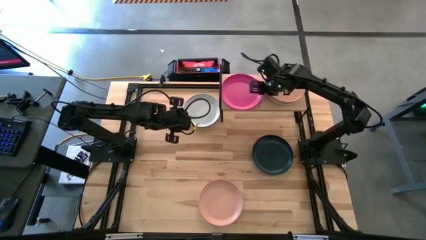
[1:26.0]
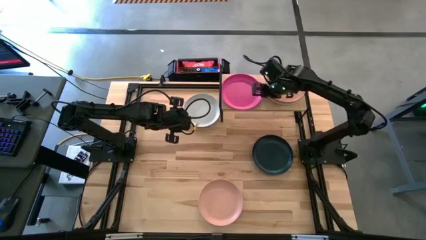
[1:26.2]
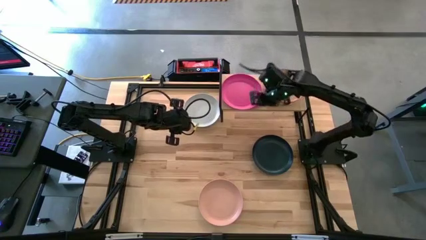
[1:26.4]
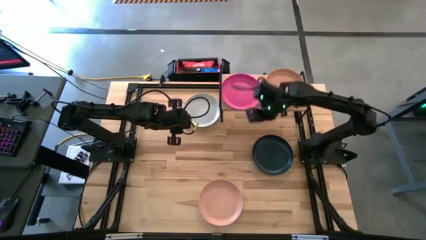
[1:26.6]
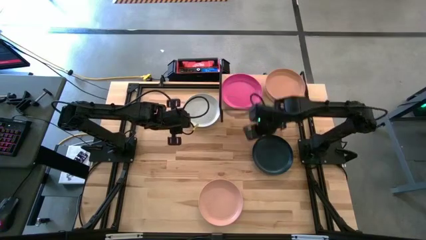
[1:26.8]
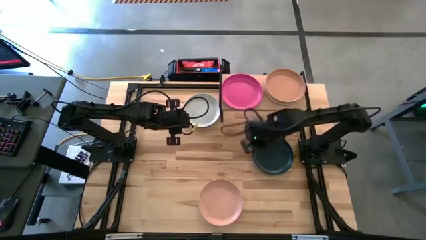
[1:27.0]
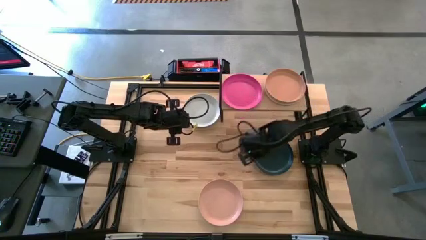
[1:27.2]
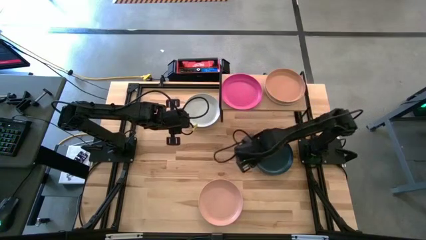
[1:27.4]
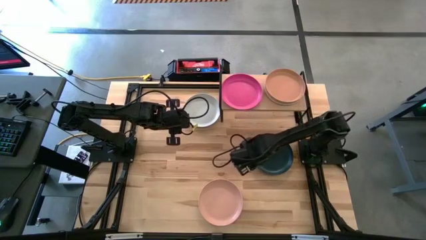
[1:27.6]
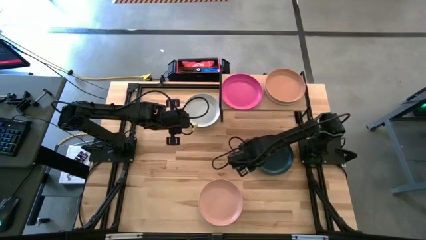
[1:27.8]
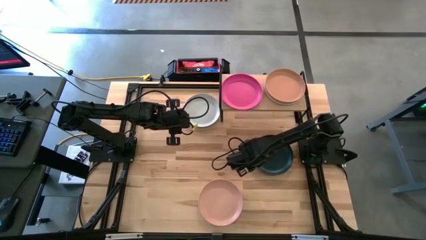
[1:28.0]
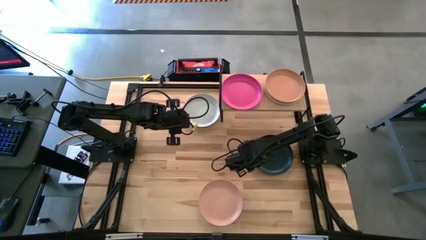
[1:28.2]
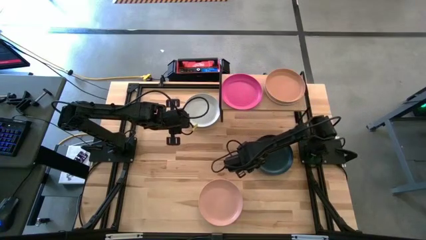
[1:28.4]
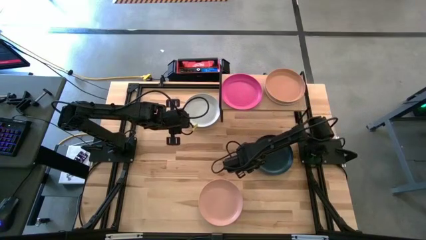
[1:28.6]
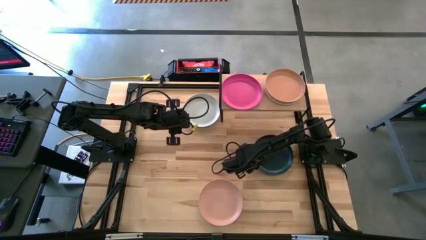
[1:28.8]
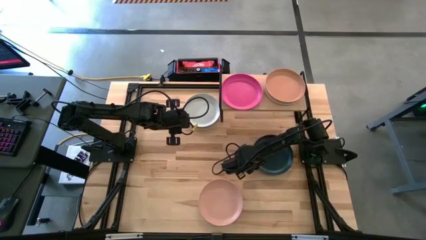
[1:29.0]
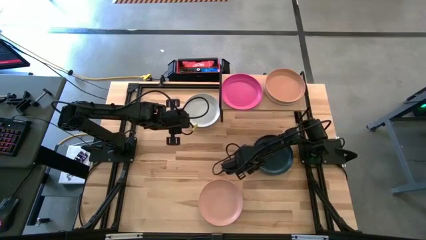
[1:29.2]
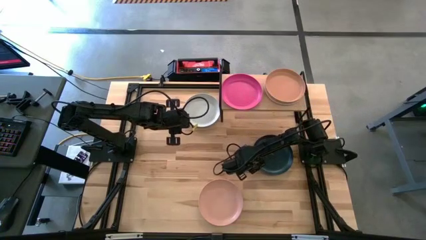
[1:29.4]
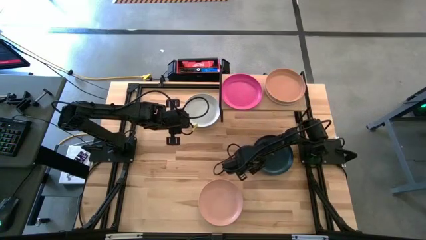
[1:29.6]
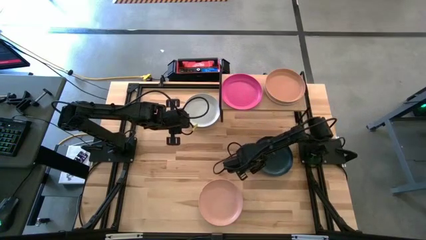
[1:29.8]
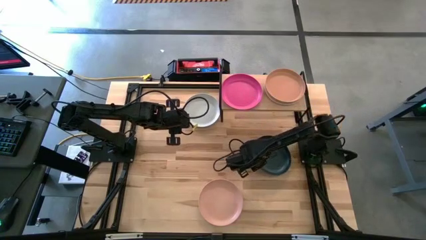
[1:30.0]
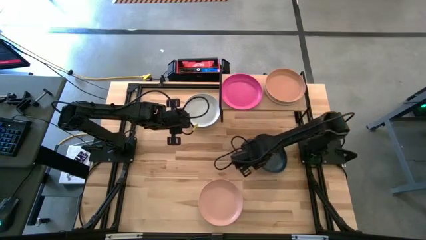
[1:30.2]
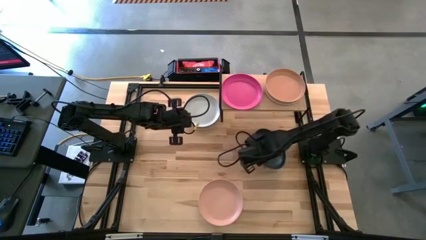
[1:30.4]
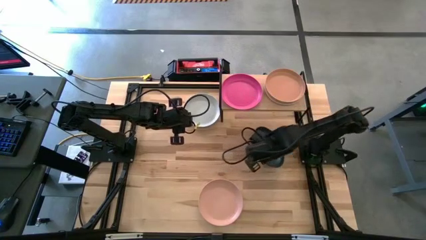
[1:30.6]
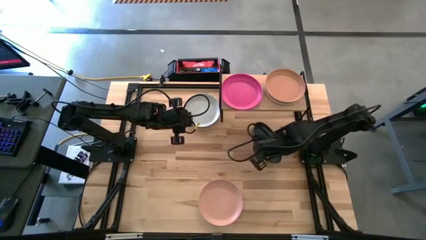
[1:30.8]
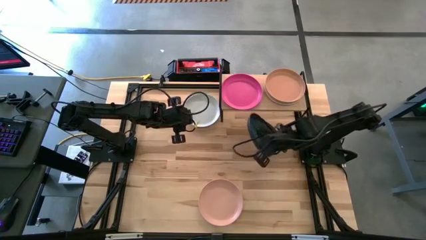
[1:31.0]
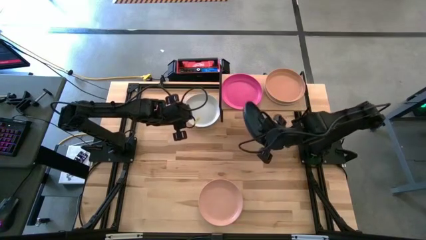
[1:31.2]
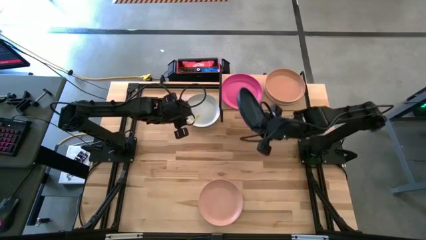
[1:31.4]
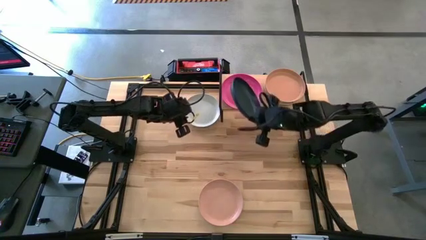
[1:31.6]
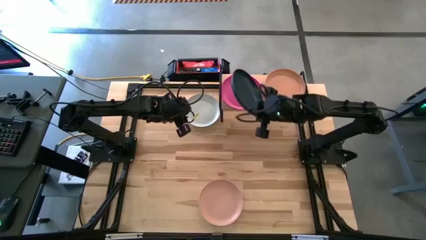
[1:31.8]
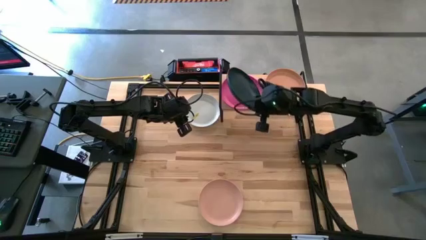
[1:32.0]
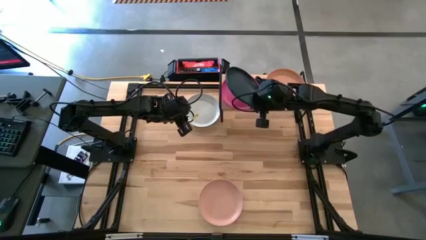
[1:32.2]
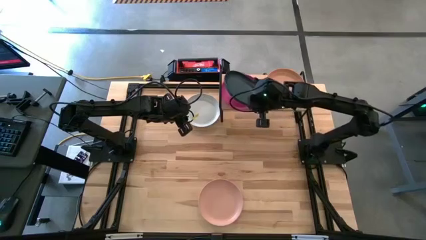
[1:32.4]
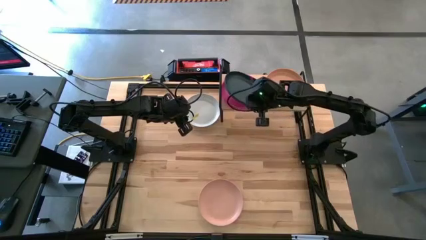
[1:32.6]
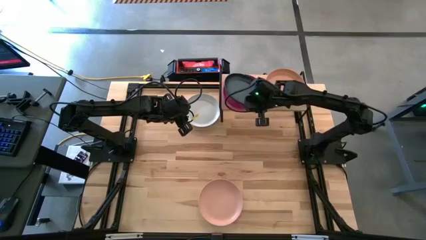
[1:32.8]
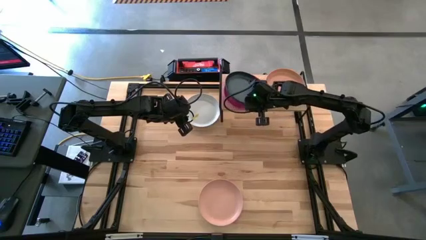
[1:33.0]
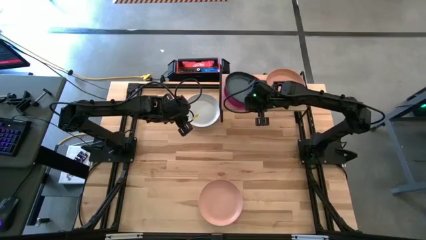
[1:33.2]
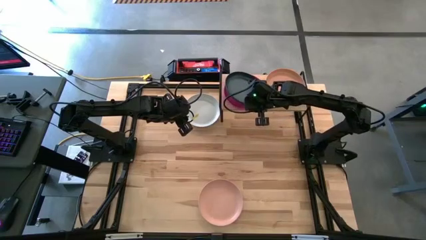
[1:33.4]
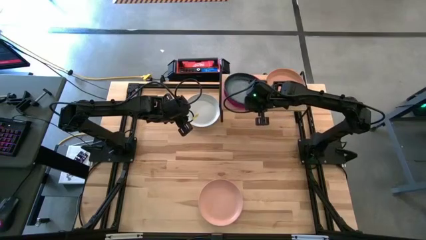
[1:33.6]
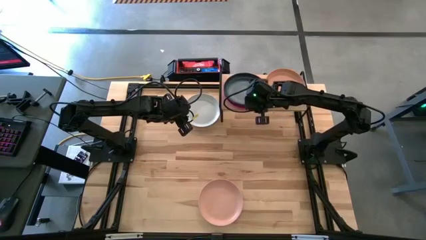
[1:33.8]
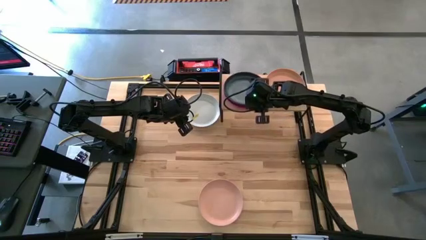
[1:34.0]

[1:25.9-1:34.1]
Task: Place and stack plates onto a shelf
Stack the blue plate on top of the pink plate

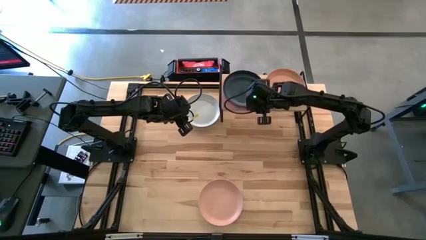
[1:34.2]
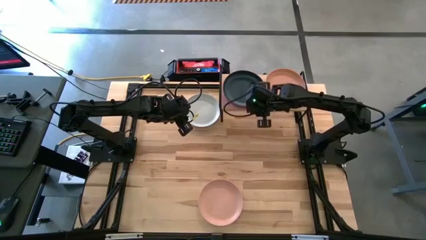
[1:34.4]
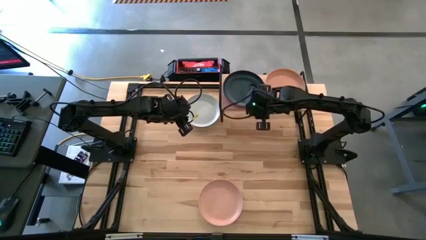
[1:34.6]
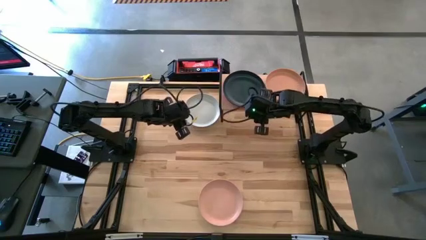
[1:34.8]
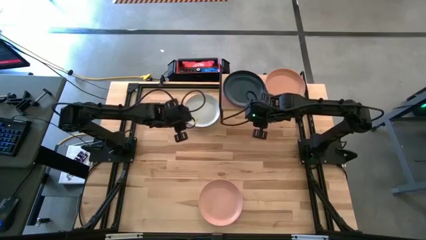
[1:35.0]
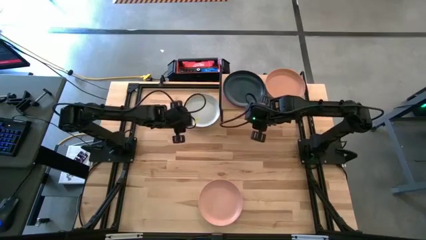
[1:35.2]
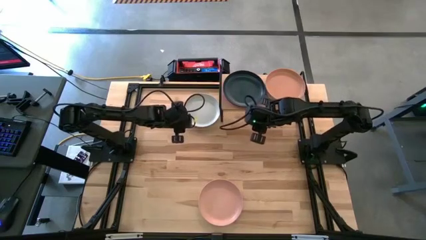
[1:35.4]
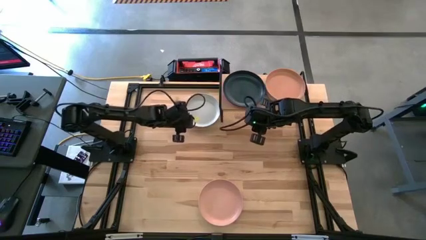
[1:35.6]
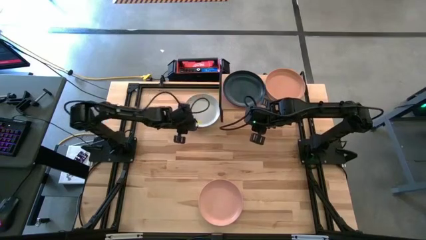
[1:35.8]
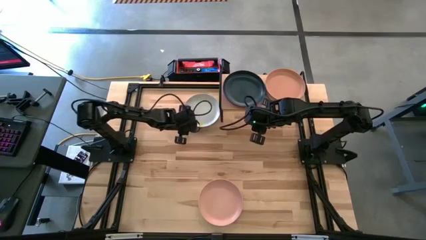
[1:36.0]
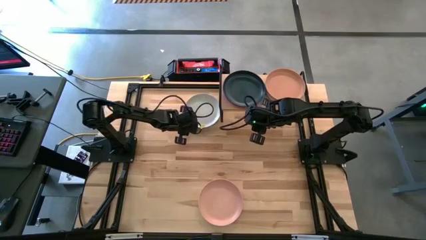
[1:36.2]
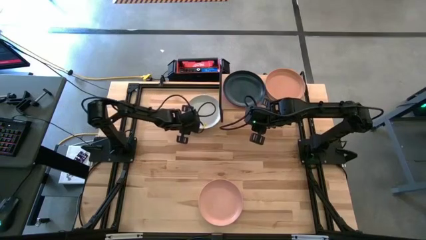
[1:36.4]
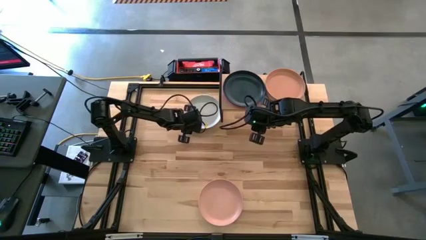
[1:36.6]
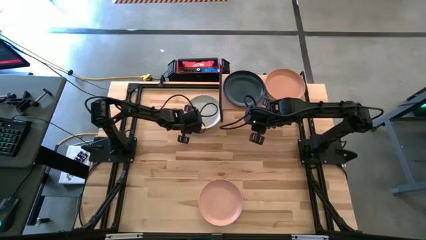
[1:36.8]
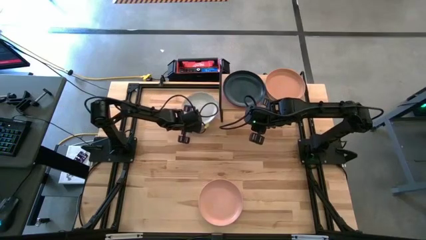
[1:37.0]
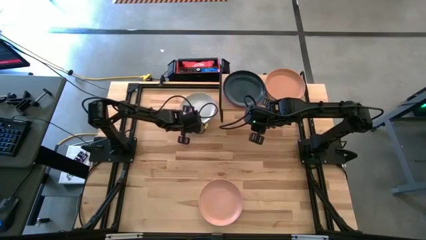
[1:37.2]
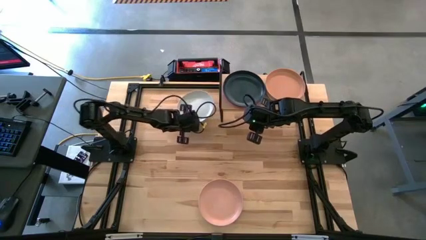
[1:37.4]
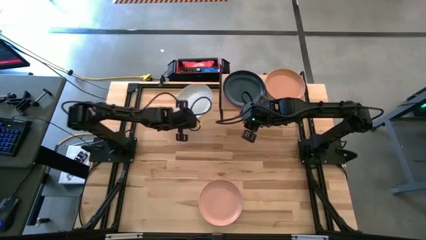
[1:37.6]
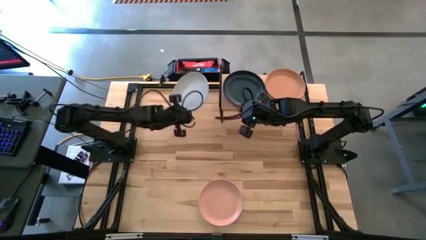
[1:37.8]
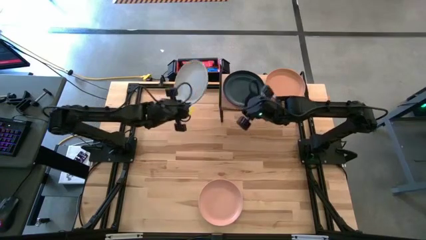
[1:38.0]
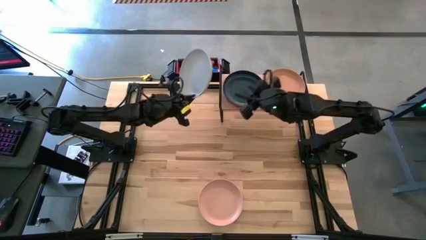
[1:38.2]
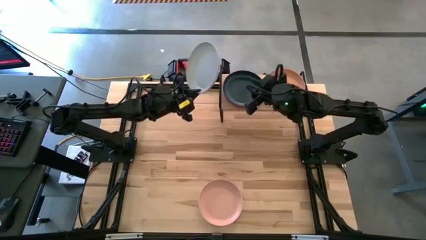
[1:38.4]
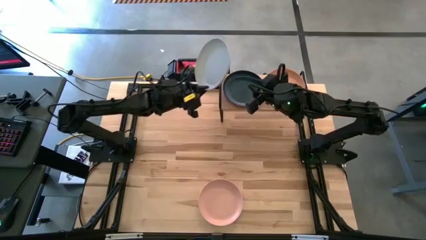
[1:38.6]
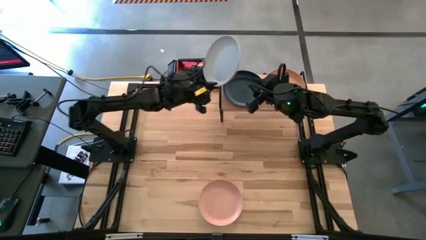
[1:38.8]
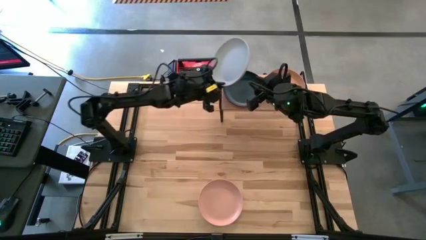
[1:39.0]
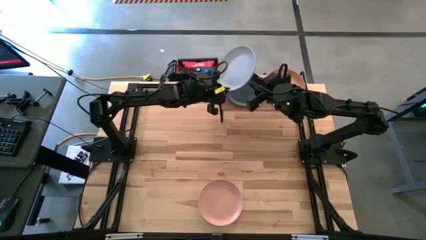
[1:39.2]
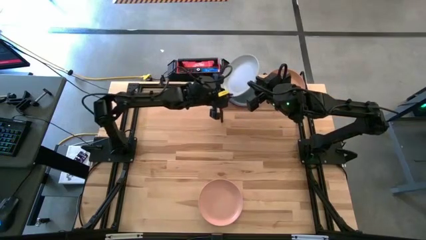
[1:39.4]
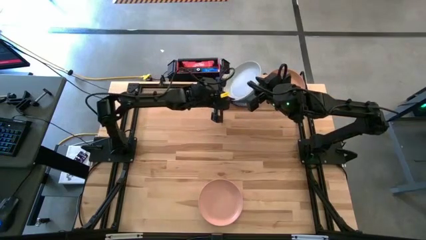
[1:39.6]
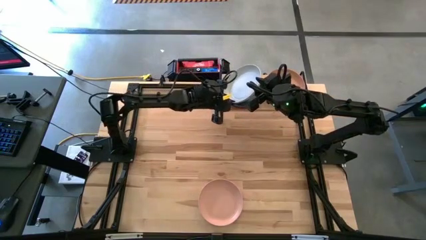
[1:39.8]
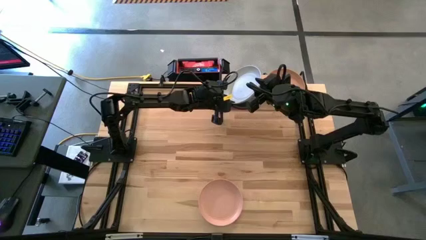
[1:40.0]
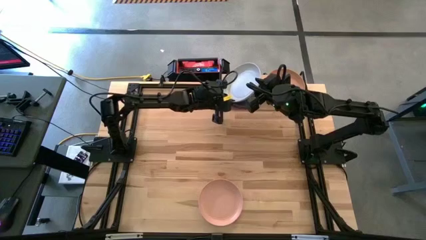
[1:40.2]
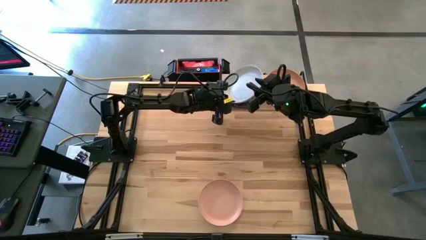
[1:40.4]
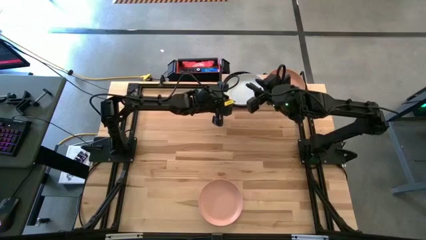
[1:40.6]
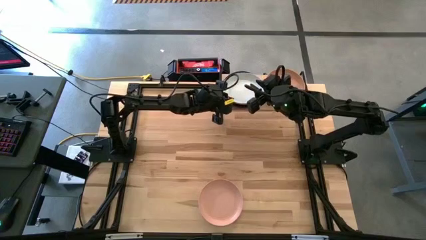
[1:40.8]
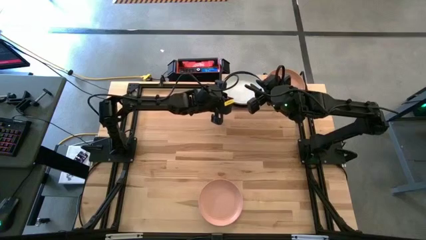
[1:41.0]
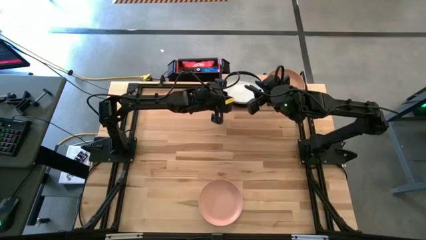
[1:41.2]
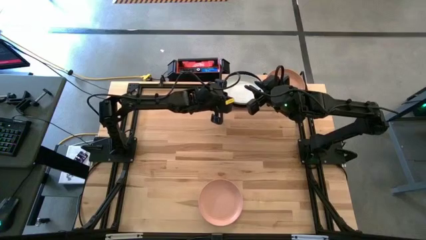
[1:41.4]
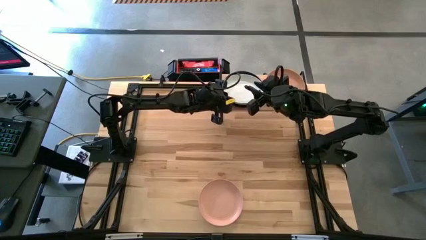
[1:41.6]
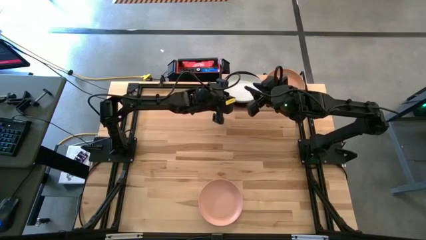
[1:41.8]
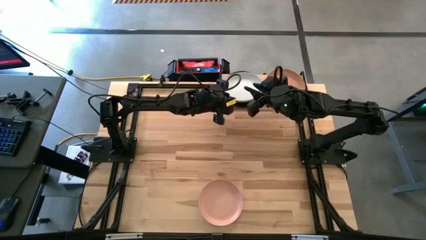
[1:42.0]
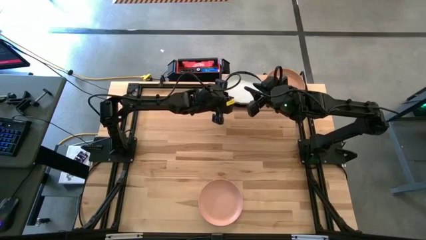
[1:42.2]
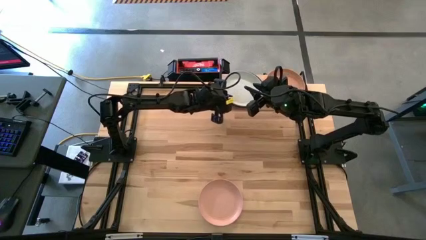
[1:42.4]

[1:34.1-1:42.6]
Put the light gray plate on top of the black plate
